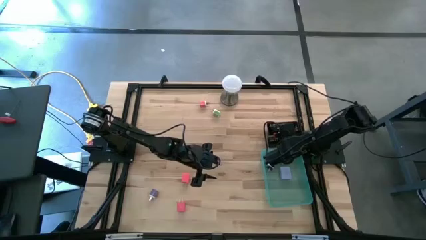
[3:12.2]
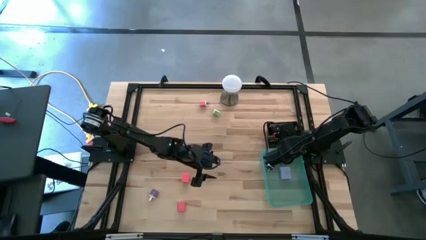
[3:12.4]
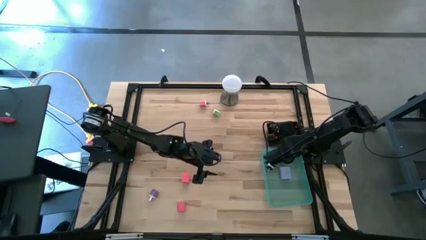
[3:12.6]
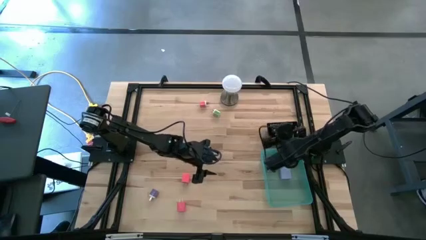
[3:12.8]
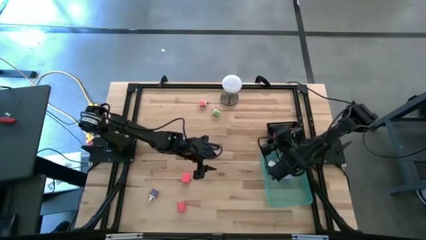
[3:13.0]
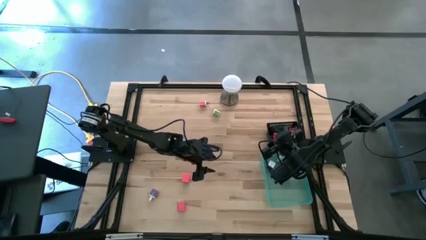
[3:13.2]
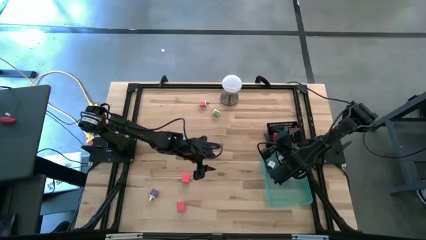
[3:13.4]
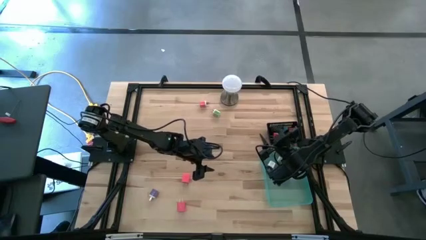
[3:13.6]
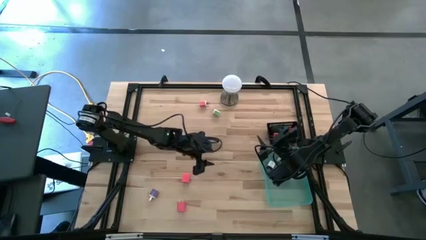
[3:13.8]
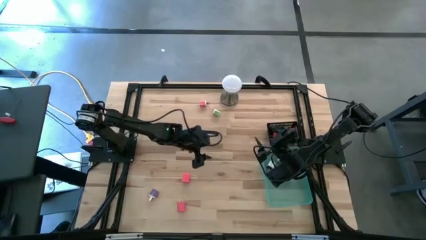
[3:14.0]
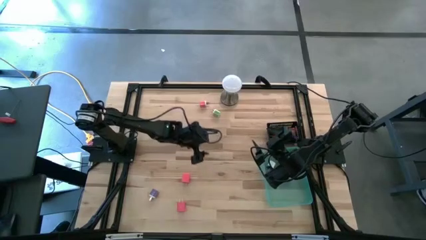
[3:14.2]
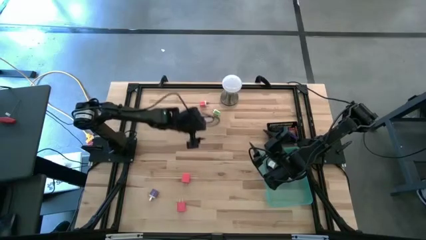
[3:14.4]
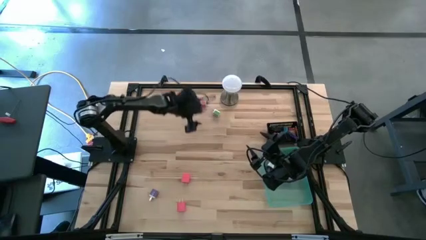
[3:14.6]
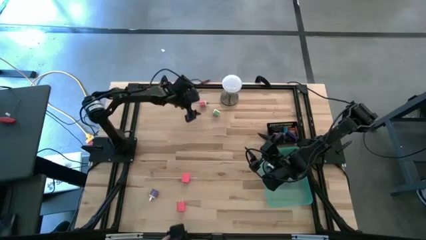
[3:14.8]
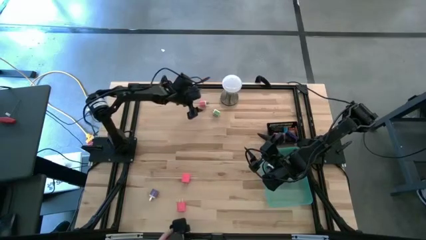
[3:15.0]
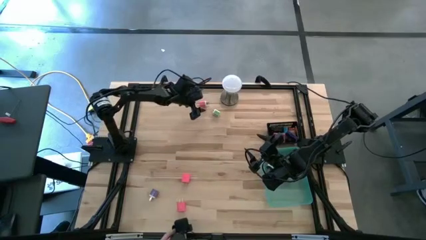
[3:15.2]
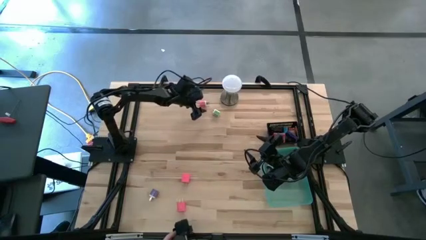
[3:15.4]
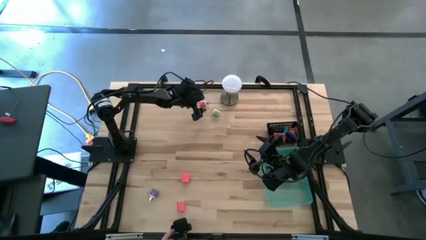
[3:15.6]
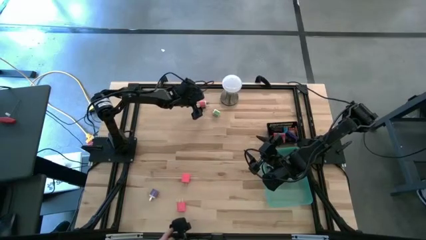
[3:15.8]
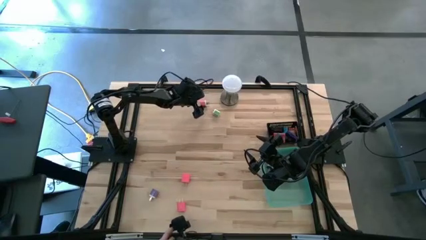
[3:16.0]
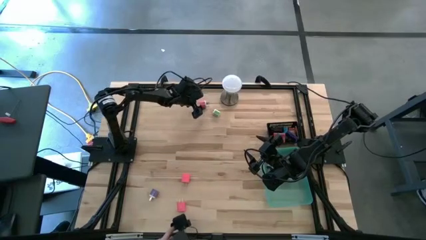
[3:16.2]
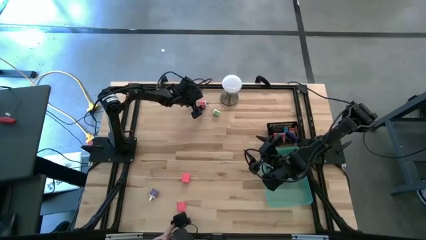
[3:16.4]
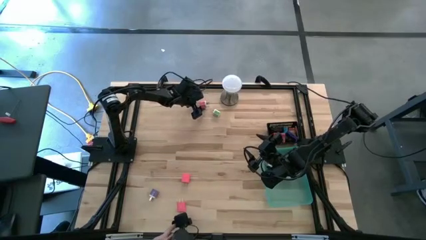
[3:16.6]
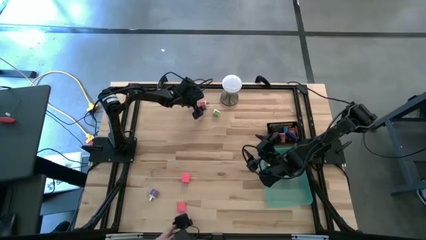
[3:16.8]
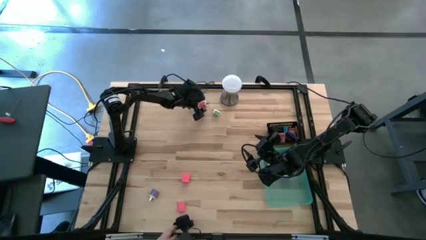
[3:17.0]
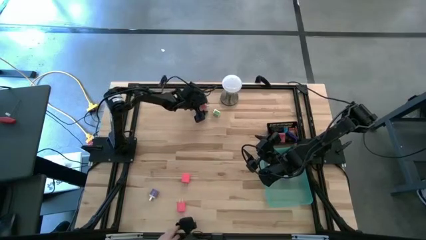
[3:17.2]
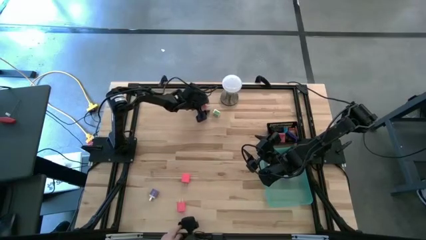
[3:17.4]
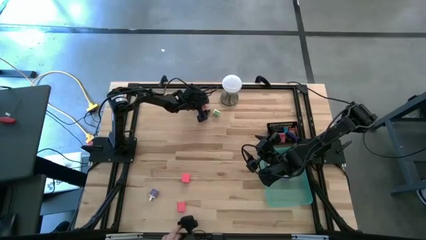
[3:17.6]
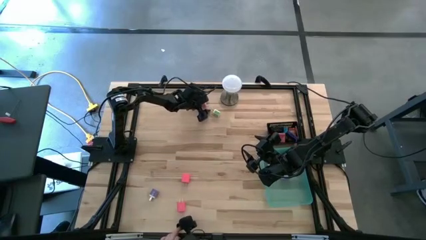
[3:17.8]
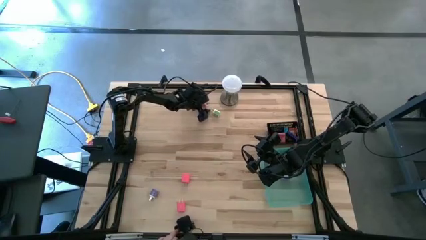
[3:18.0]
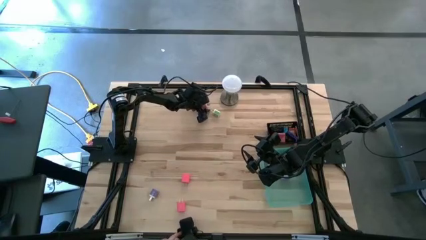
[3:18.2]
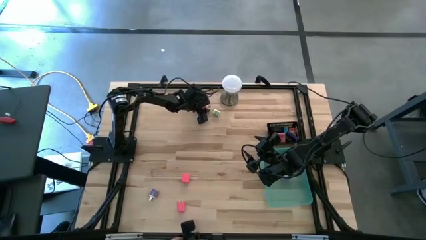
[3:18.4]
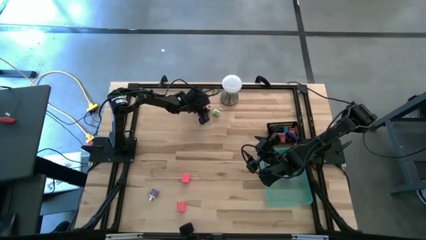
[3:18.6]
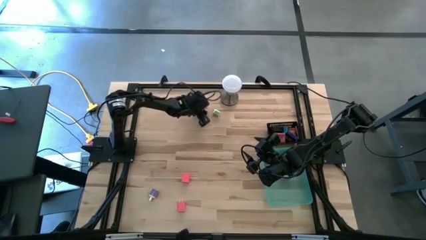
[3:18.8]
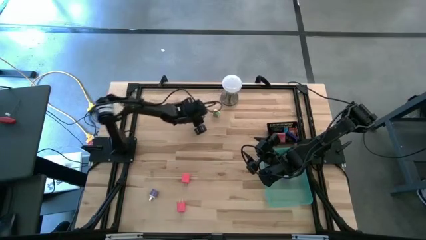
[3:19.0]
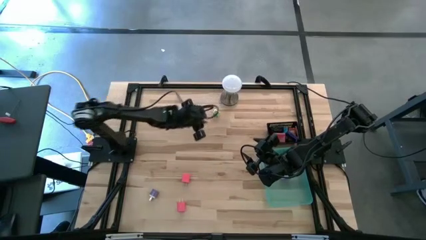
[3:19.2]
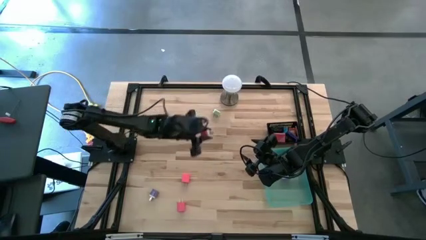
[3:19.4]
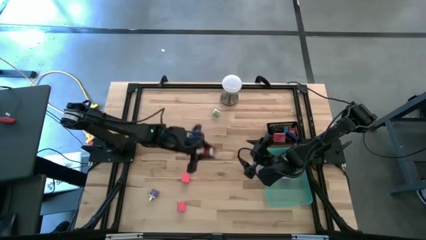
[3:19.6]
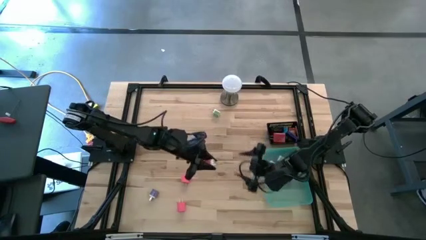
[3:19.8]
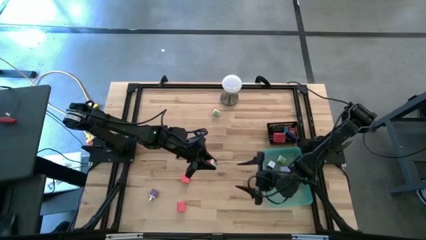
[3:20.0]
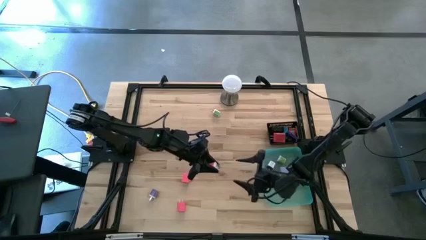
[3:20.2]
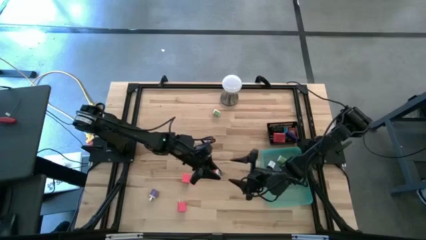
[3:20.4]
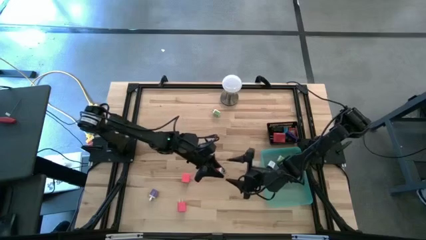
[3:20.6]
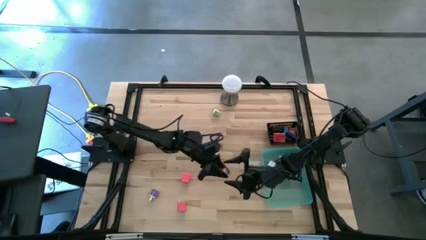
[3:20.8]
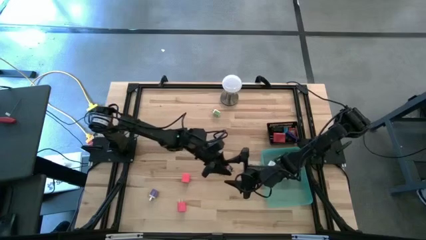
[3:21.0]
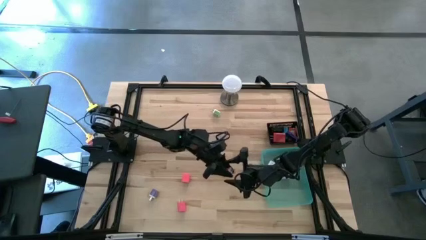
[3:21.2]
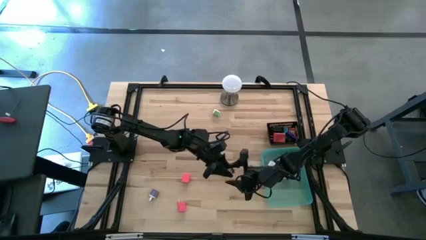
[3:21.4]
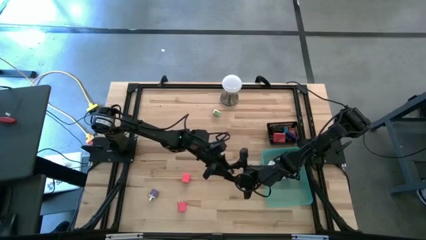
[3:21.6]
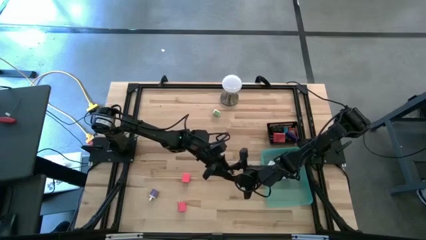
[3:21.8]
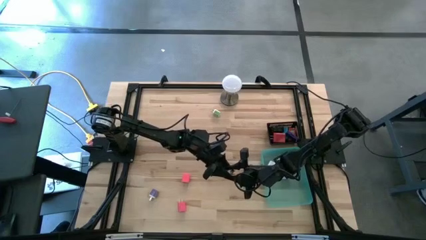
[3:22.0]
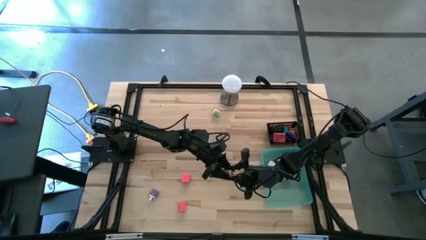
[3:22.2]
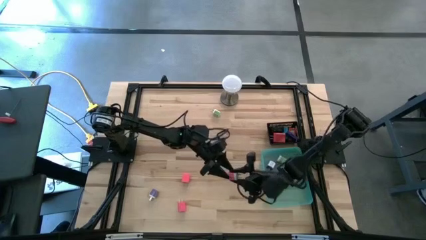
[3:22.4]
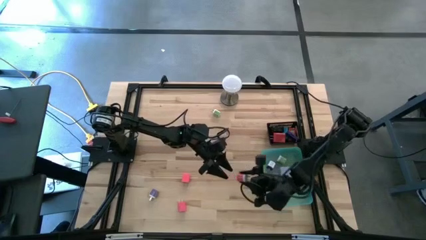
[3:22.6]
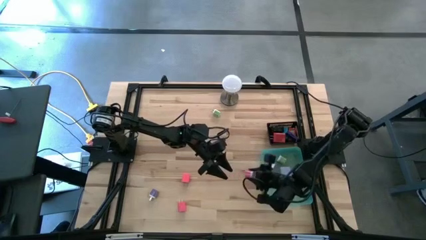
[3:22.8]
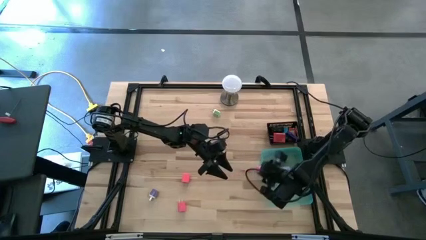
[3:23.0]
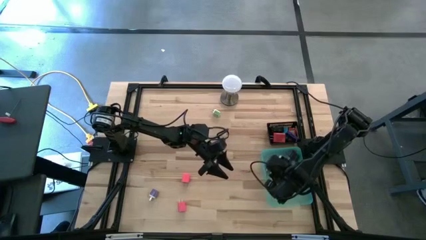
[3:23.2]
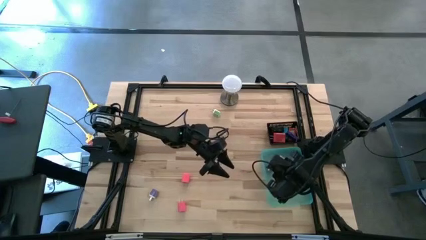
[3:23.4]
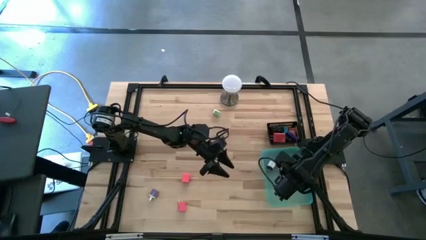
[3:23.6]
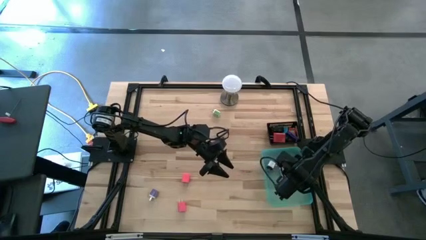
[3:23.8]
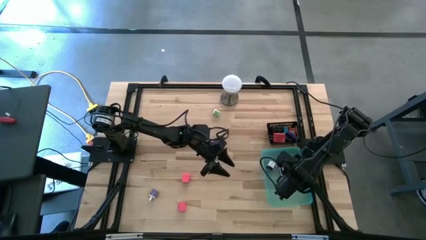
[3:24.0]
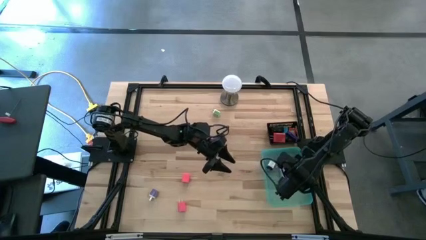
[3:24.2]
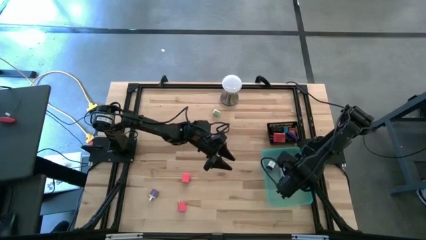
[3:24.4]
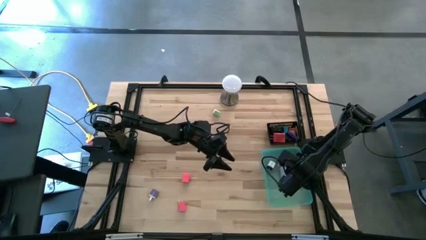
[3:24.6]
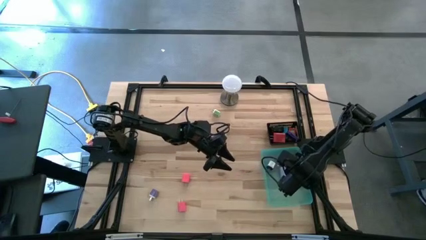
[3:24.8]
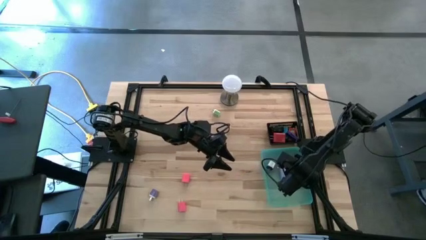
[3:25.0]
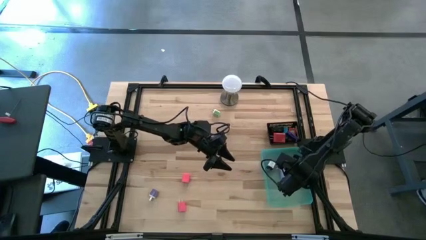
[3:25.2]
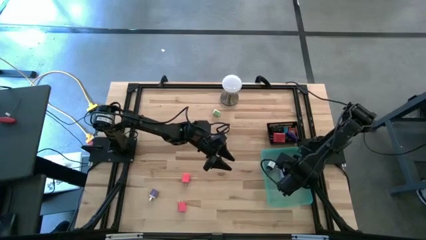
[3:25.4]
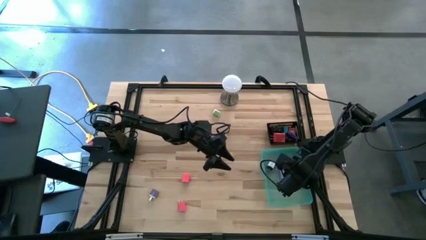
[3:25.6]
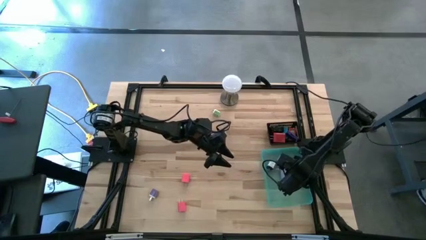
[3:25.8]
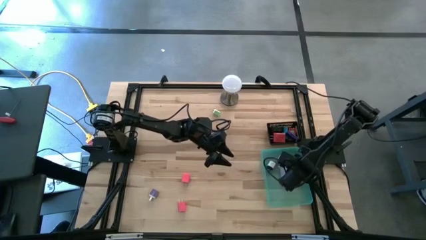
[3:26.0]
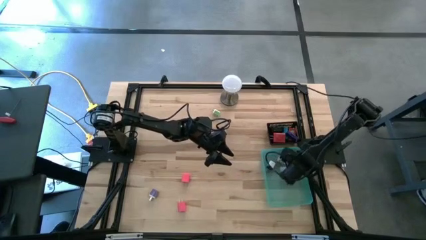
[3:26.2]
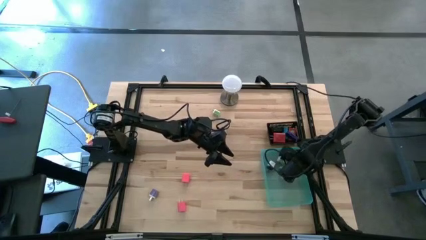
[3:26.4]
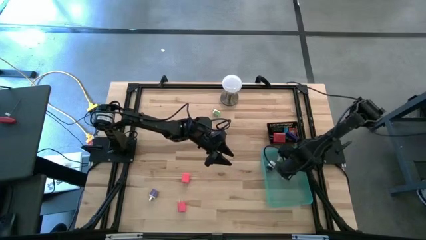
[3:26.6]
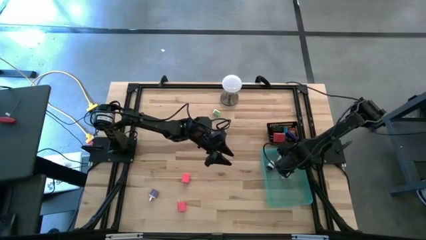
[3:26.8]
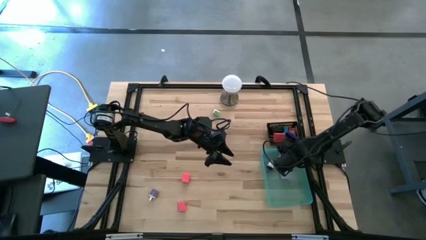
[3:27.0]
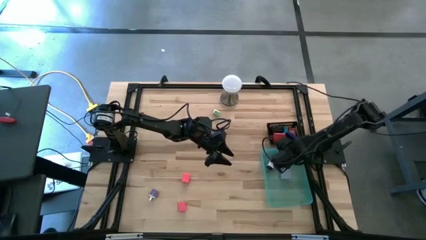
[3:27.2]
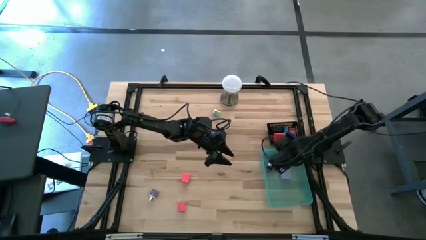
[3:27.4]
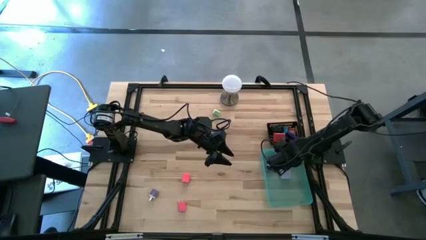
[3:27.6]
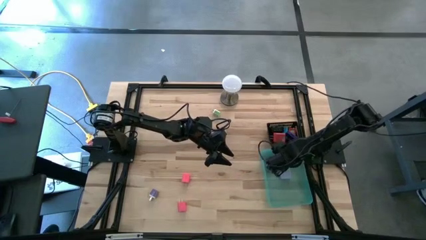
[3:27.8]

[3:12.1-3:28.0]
Task: Pick & Place Office items
Put the pink charger adapter into the green bin
